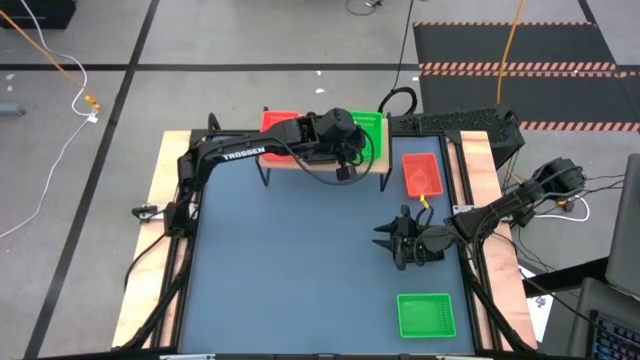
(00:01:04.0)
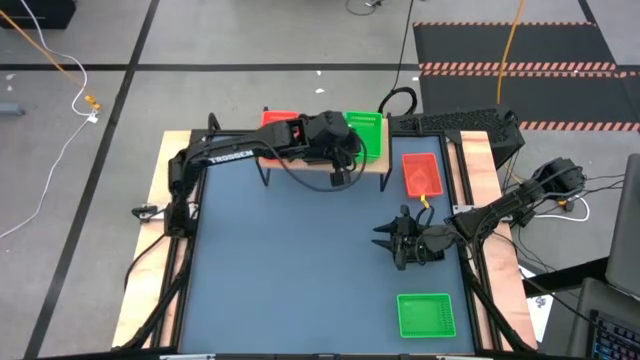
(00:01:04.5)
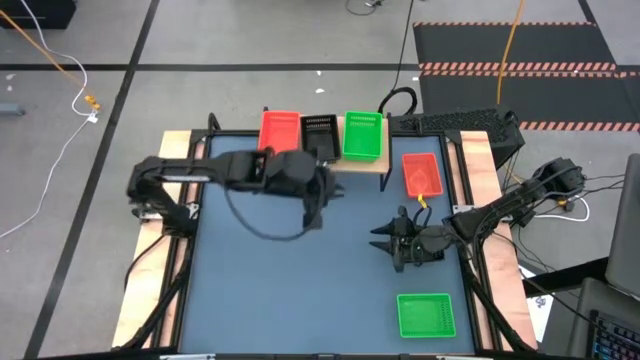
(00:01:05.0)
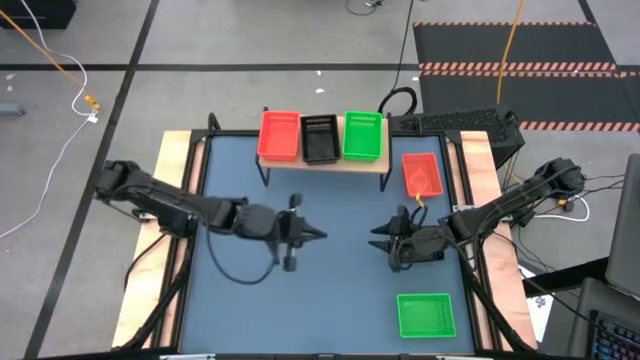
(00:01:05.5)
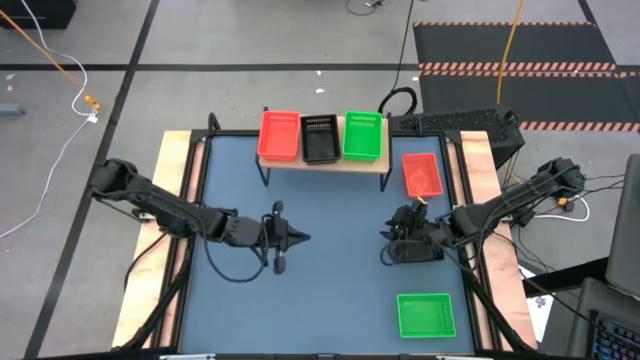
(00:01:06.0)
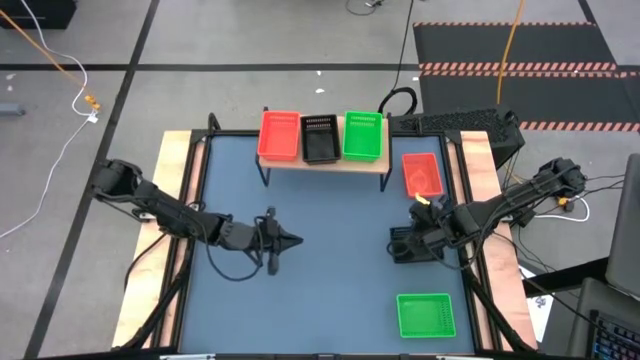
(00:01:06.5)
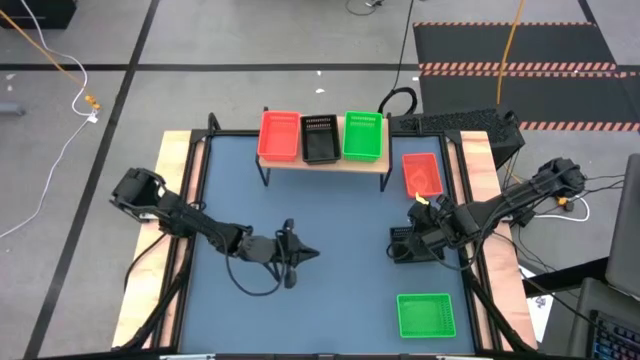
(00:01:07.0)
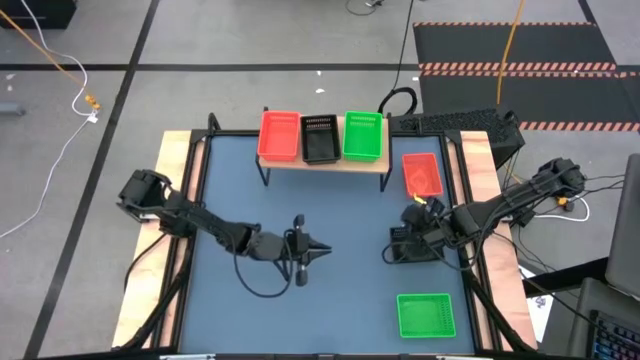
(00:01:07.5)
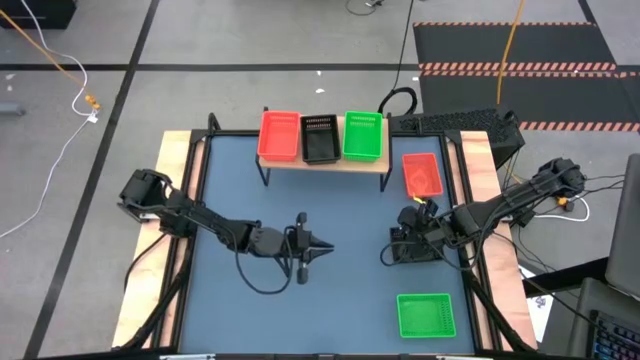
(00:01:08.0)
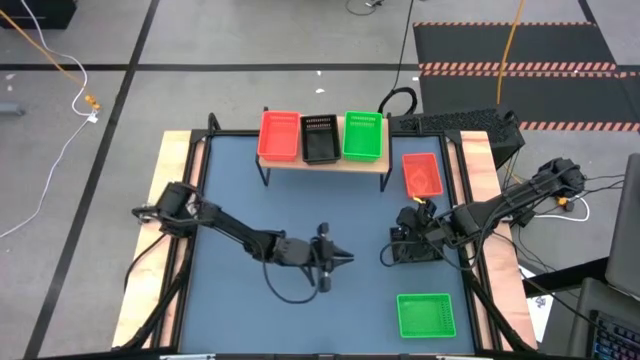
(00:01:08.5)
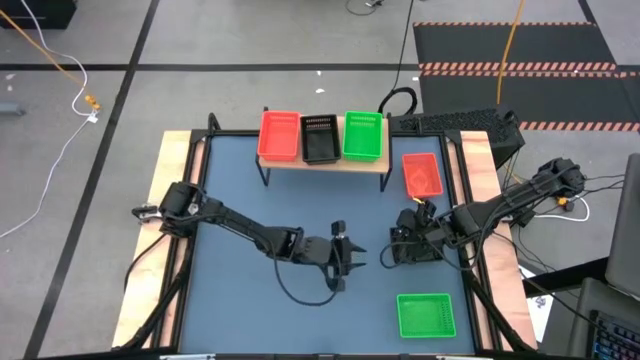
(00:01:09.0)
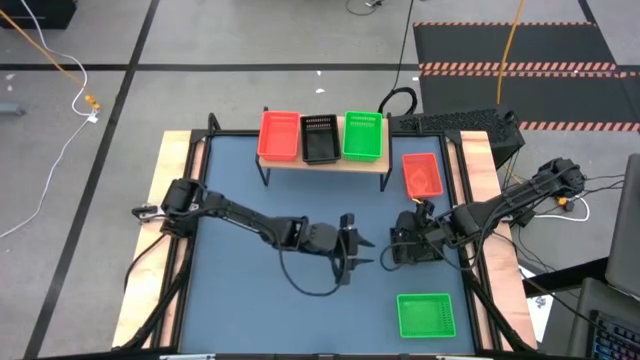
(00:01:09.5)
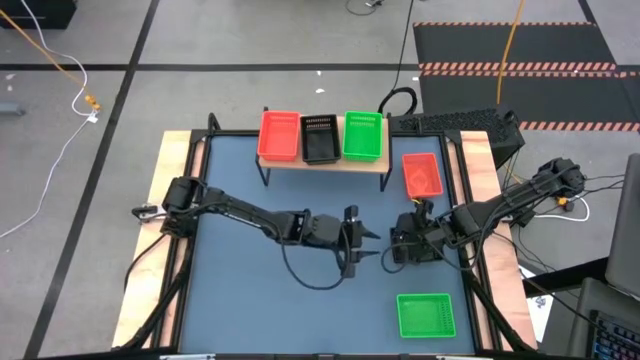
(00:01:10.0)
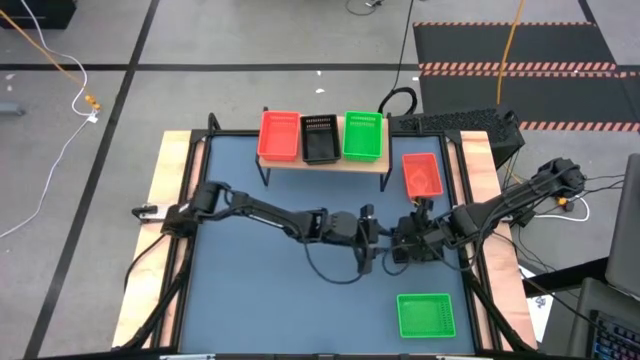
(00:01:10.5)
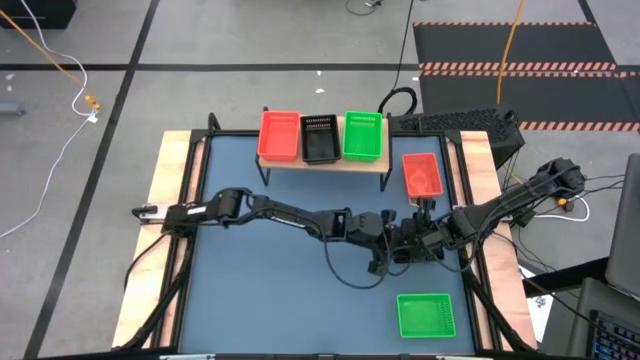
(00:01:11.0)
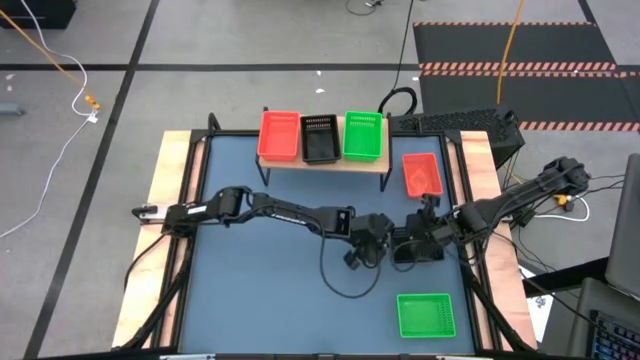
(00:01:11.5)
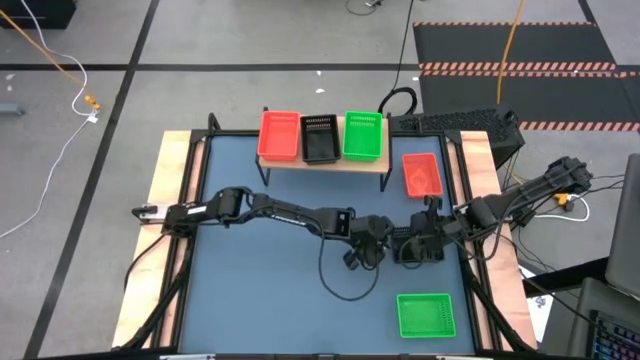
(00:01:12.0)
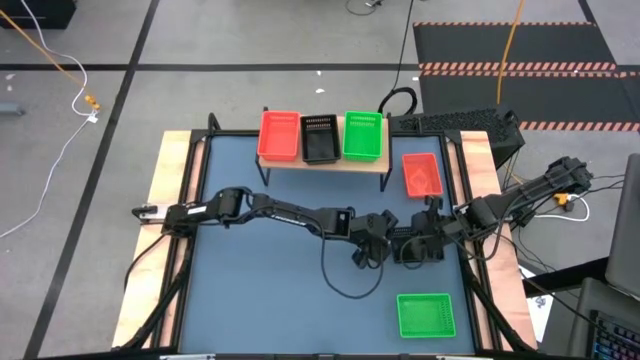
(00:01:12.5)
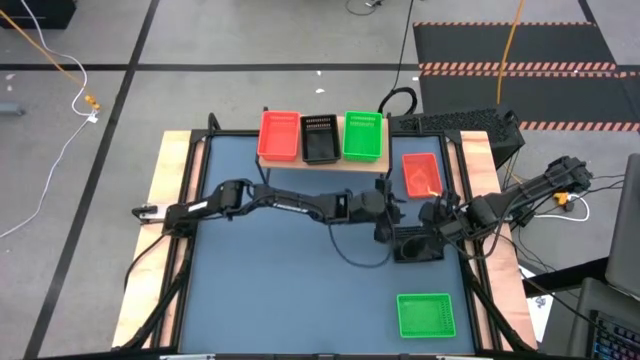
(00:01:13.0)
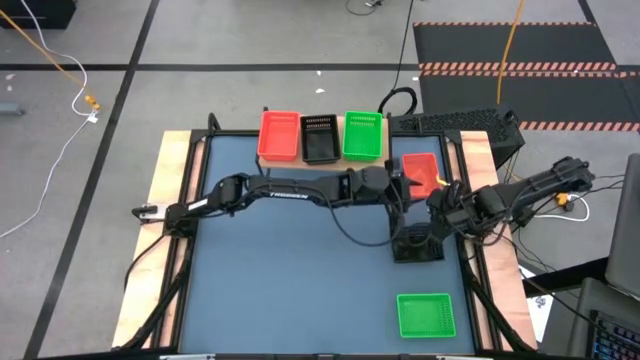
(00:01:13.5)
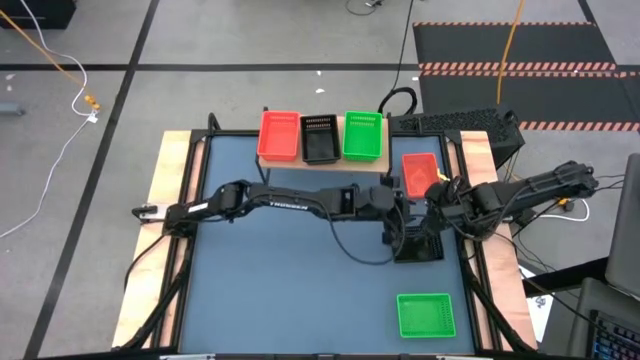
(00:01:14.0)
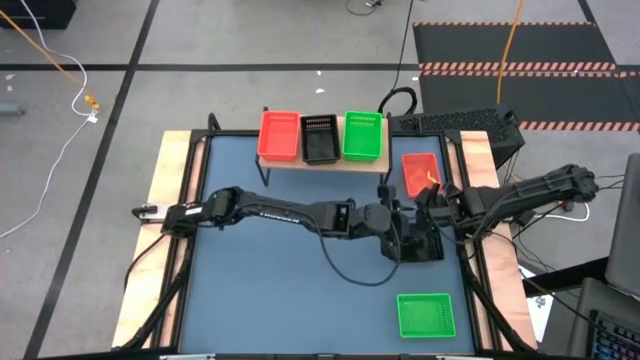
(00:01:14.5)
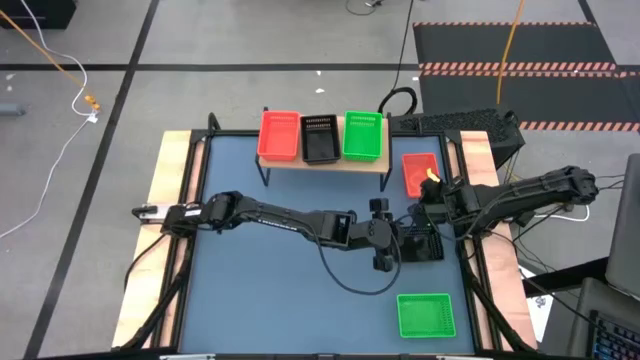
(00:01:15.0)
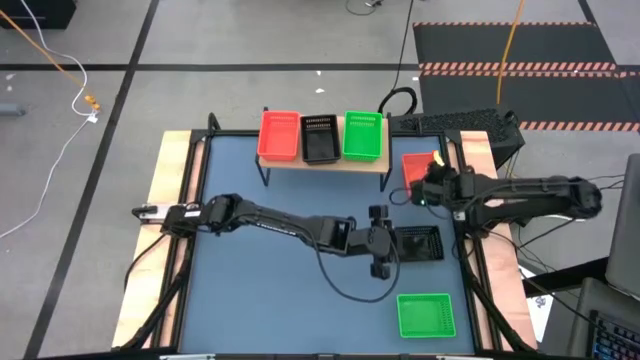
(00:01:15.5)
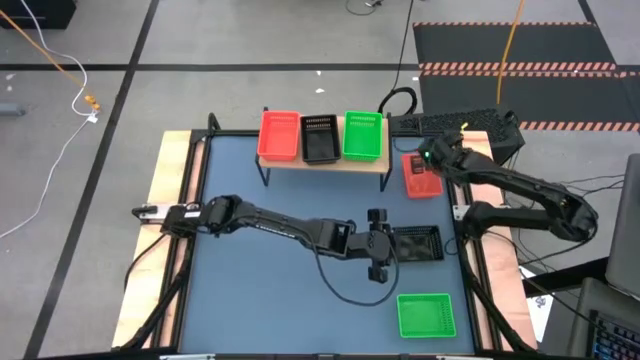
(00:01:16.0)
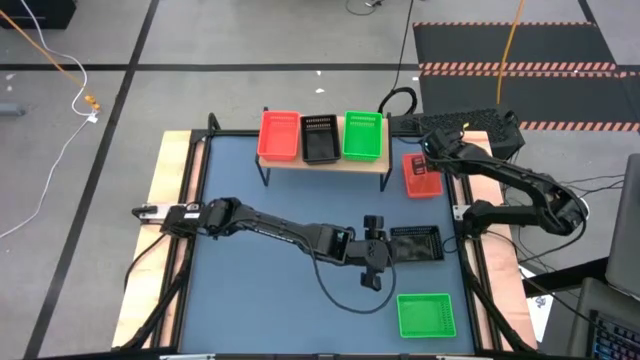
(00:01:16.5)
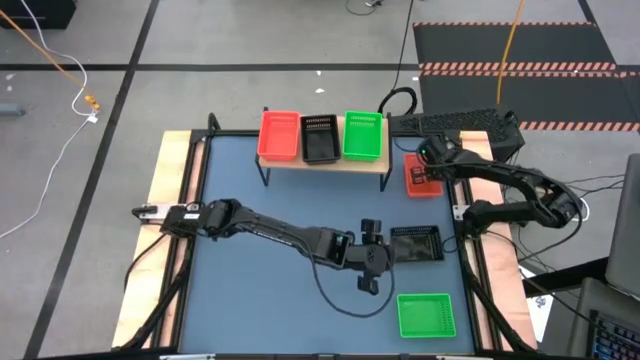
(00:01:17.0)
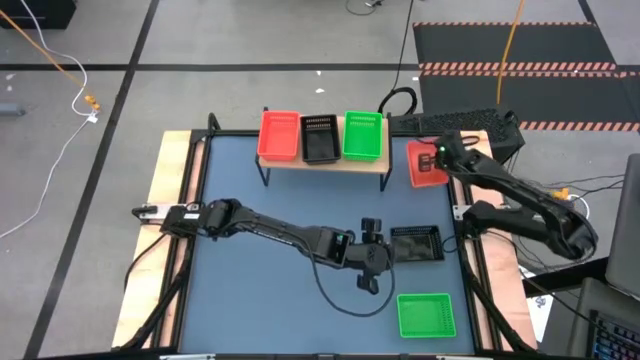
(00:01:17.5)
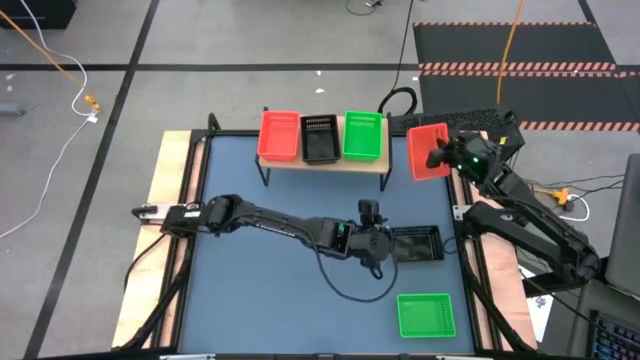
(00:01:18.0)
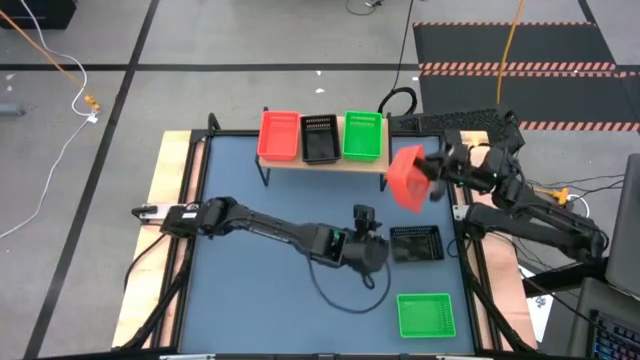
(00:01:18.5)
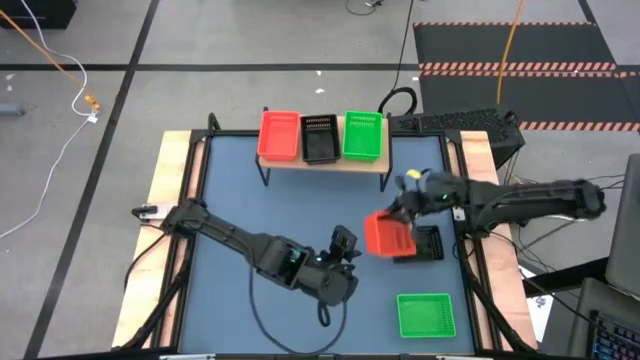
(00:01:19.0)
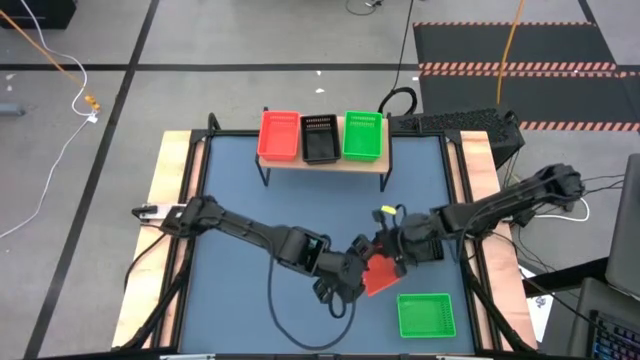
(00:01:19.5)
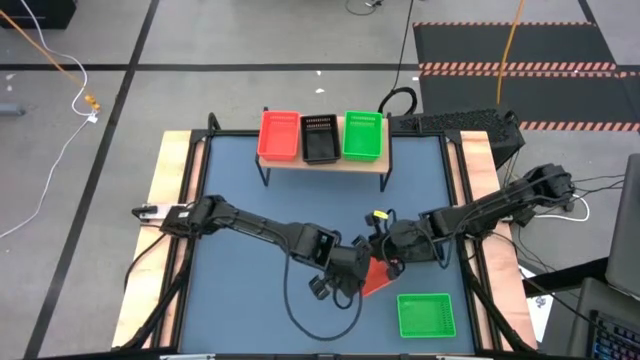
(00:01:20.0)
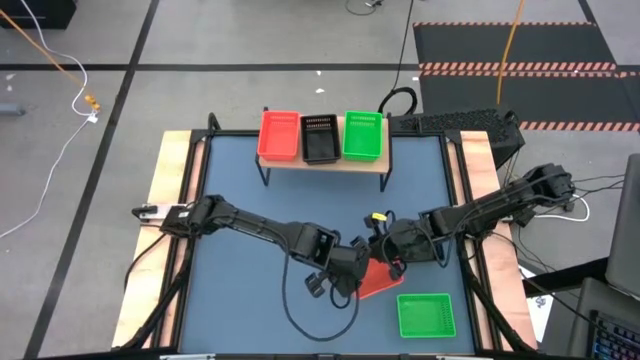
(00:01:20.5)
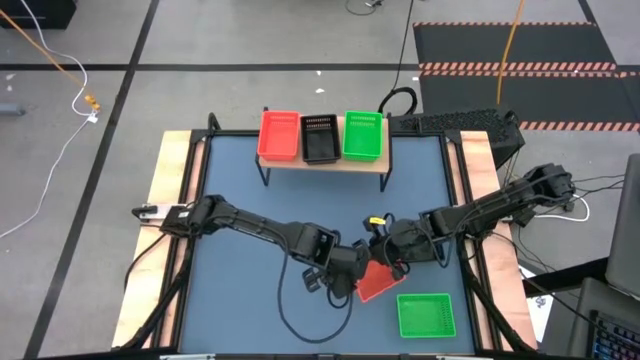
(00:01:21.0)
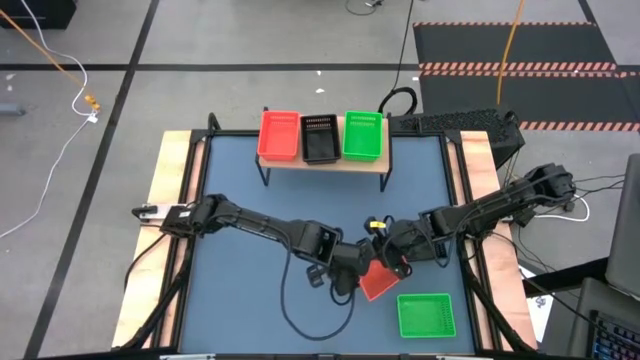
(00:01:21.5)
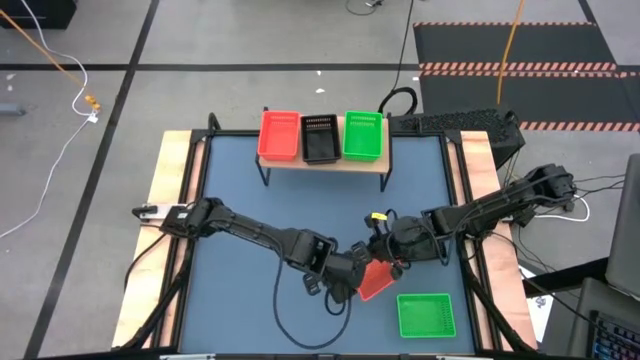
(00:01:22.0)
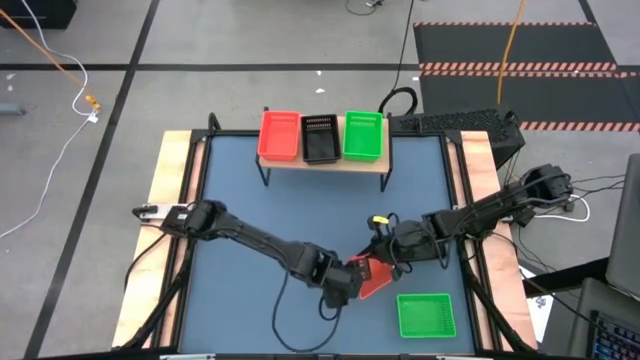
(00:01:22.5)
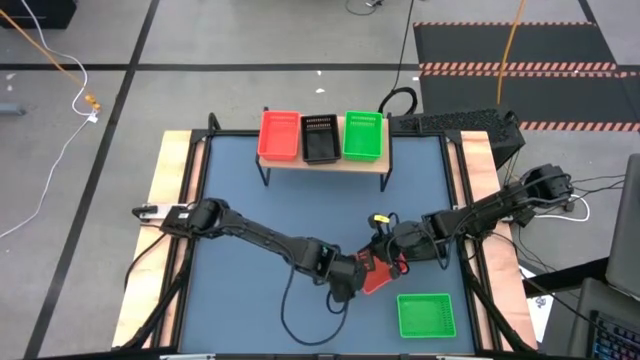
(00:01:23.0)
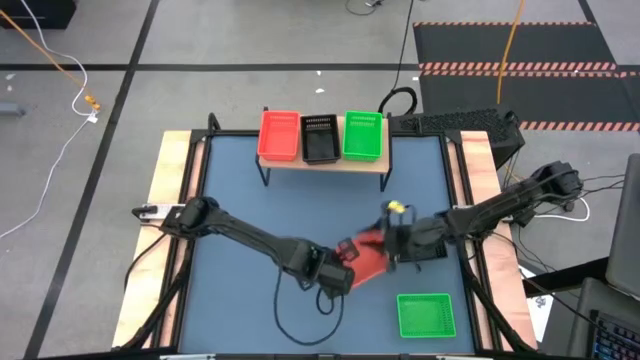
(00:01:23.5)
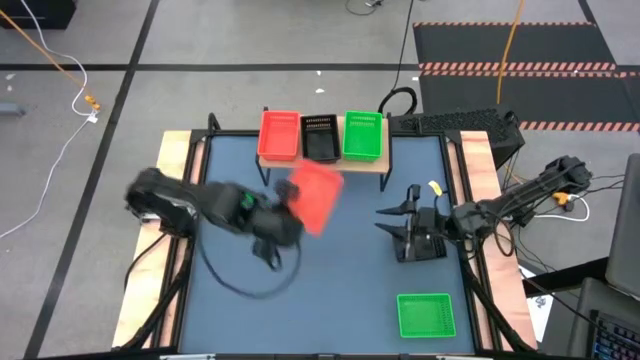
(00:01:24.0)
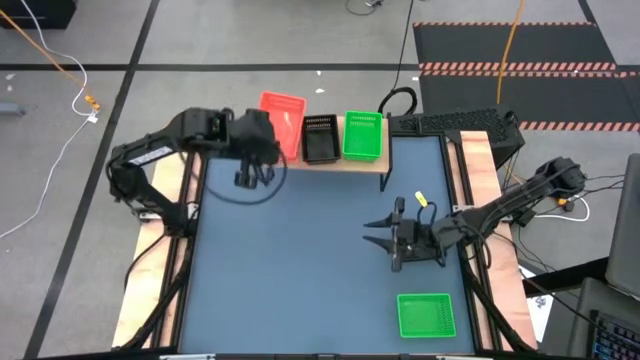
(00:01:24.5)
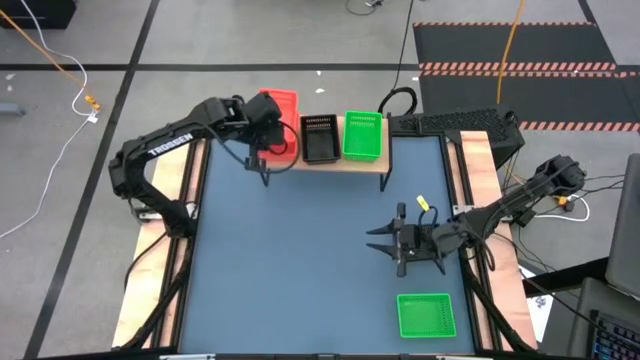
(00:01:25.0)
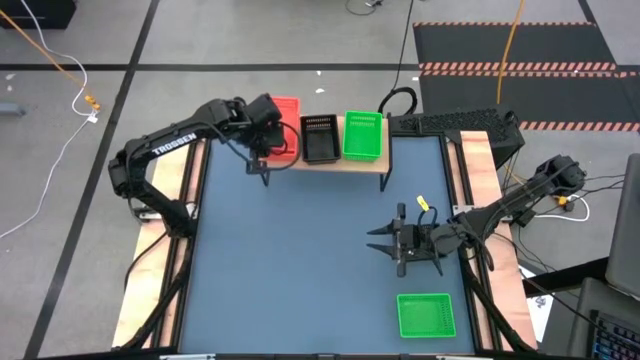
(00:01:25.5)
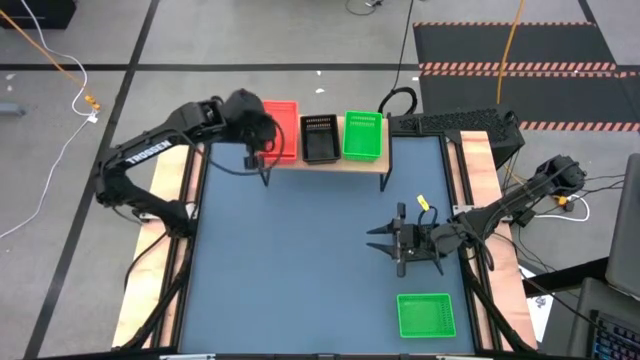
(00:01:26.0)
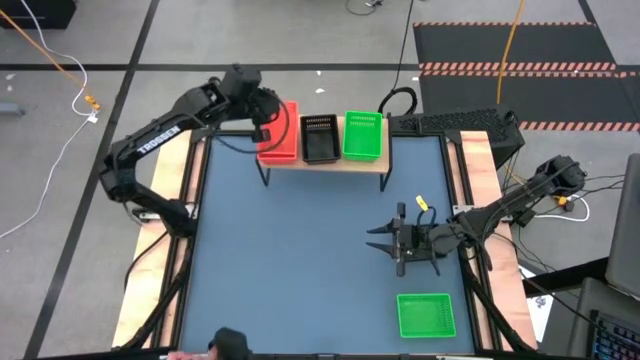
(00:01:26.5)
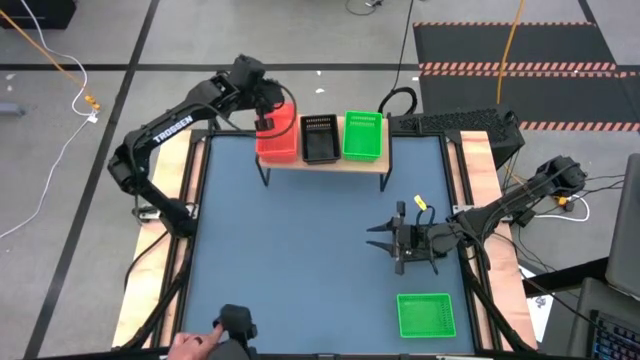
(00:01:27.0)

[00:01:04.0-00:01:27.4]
Task: Stack baskets on shelf by color
Stack the orange bin on the other orange bins on the shelf
